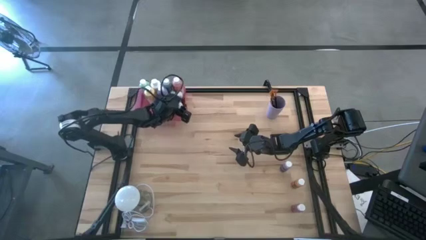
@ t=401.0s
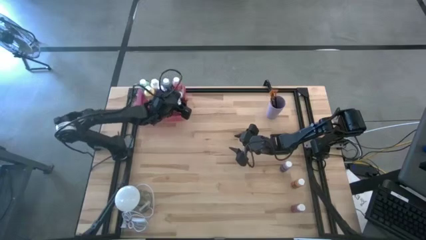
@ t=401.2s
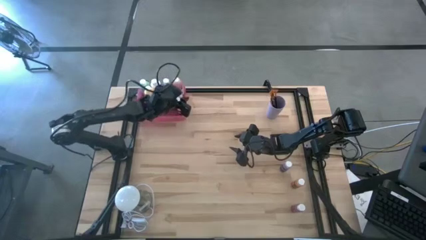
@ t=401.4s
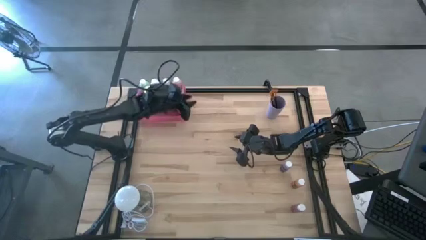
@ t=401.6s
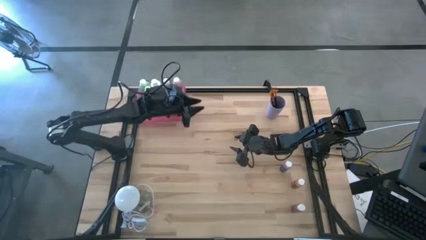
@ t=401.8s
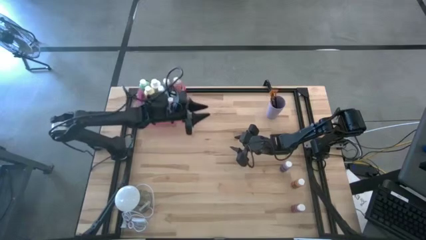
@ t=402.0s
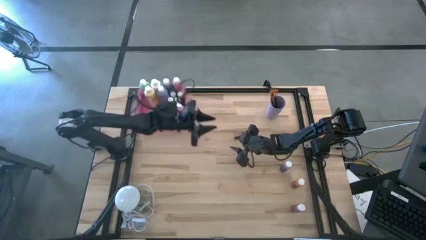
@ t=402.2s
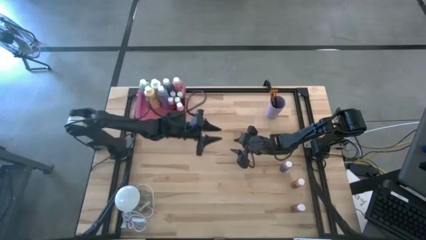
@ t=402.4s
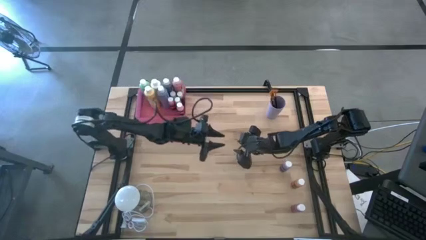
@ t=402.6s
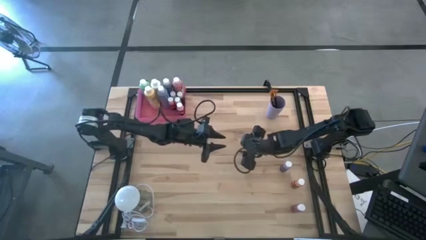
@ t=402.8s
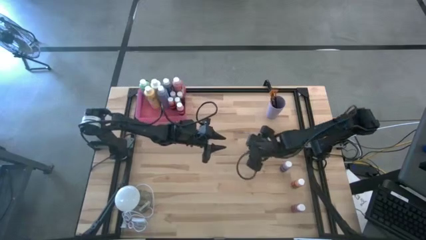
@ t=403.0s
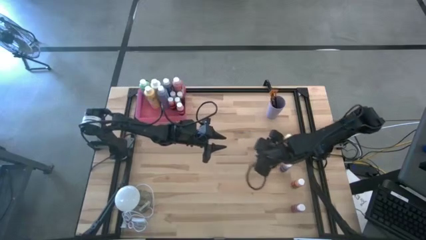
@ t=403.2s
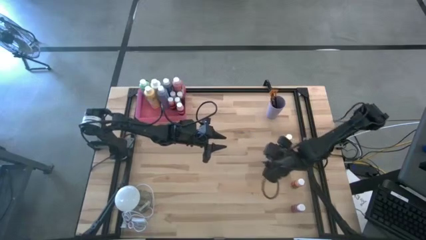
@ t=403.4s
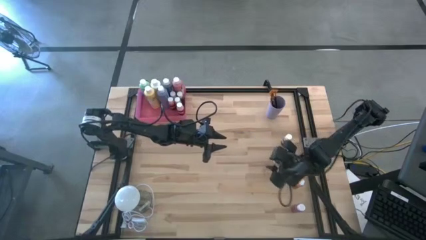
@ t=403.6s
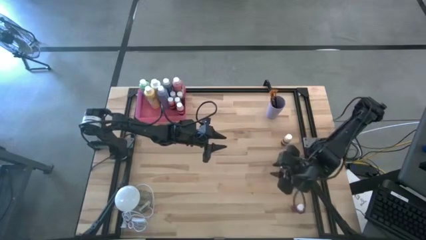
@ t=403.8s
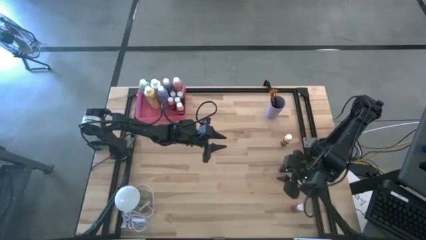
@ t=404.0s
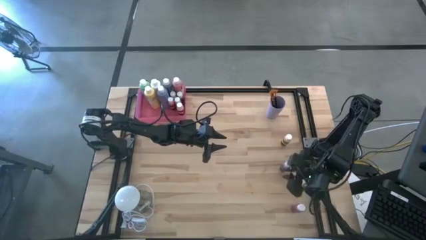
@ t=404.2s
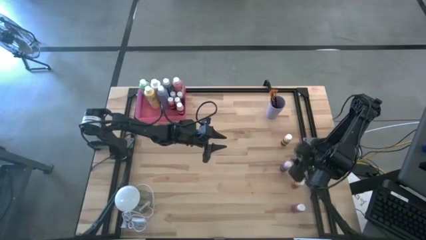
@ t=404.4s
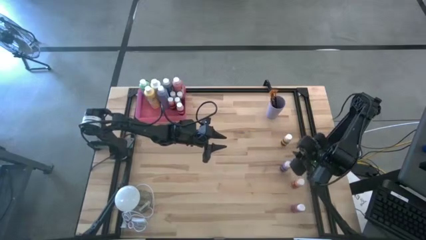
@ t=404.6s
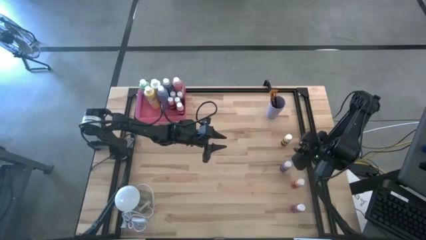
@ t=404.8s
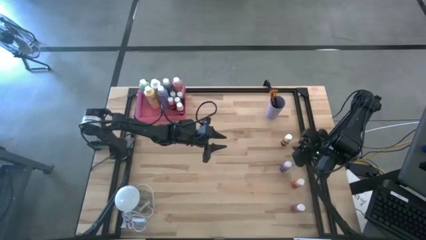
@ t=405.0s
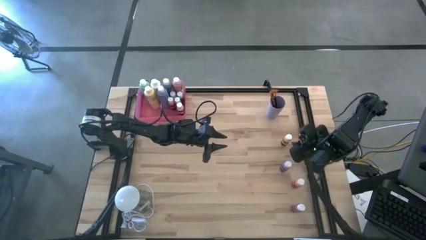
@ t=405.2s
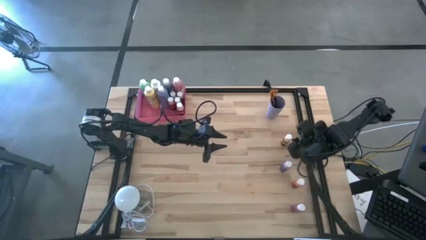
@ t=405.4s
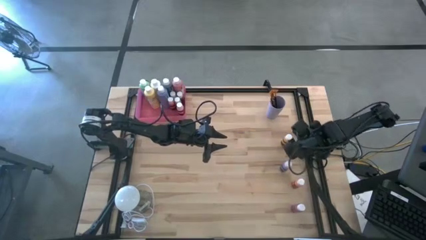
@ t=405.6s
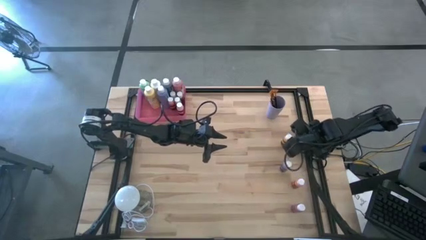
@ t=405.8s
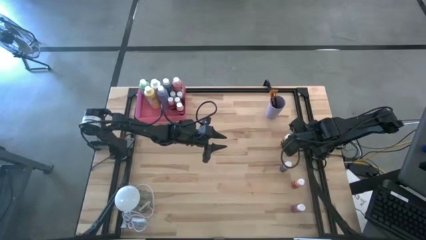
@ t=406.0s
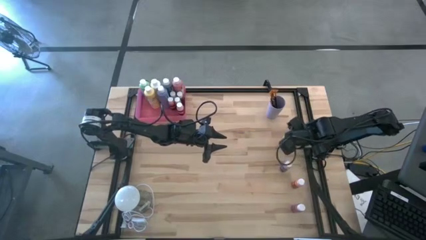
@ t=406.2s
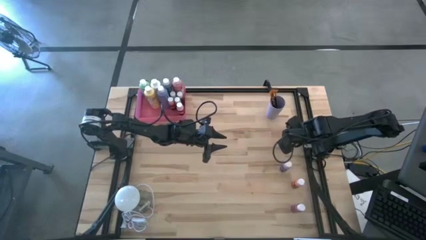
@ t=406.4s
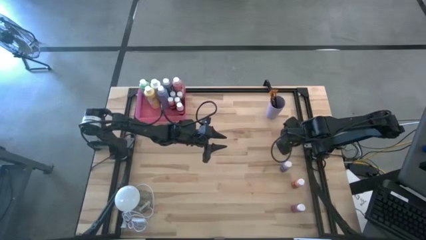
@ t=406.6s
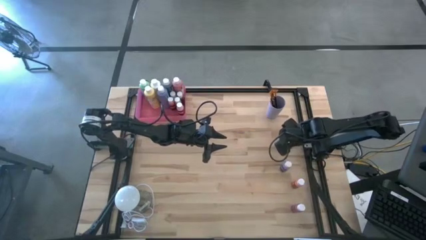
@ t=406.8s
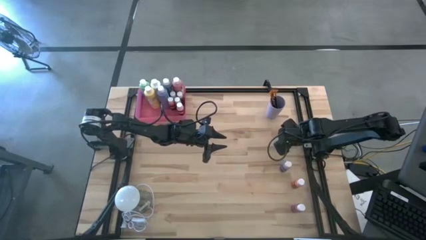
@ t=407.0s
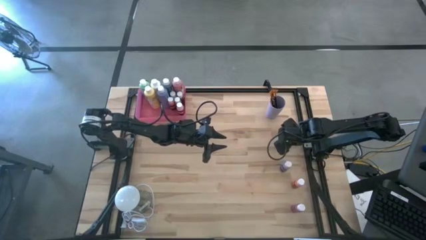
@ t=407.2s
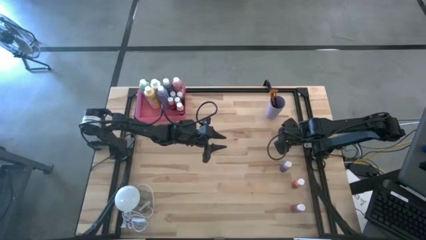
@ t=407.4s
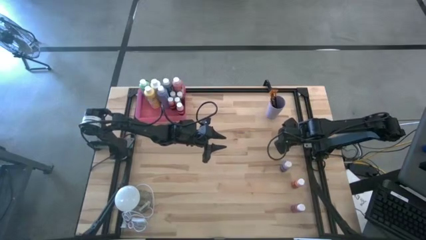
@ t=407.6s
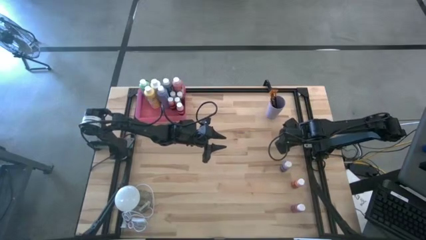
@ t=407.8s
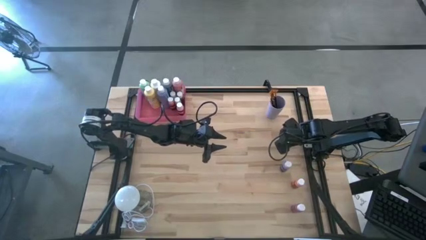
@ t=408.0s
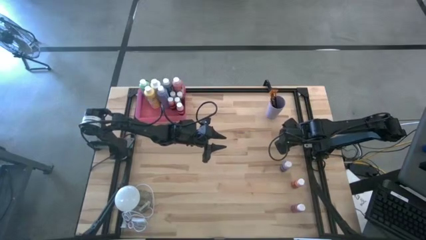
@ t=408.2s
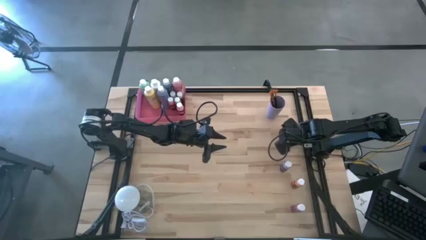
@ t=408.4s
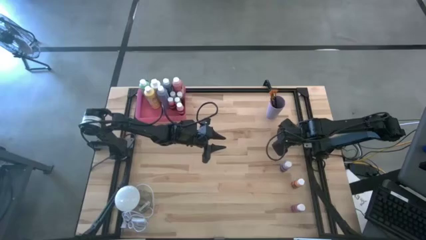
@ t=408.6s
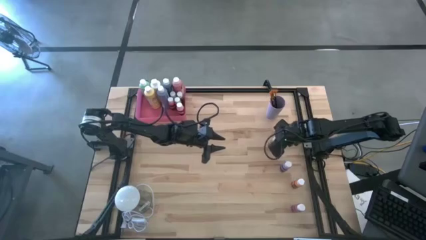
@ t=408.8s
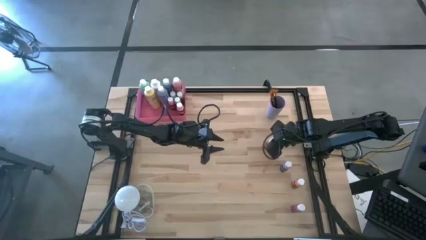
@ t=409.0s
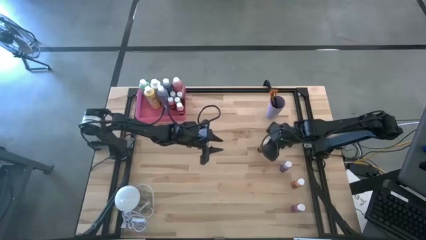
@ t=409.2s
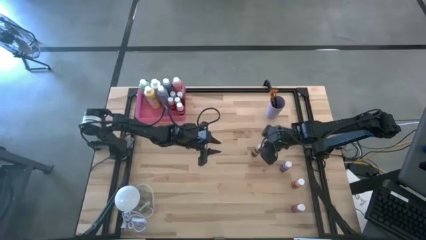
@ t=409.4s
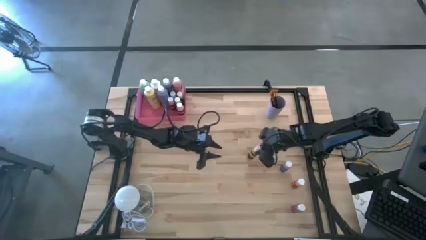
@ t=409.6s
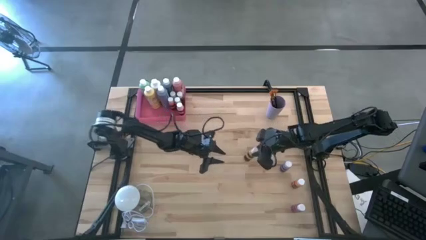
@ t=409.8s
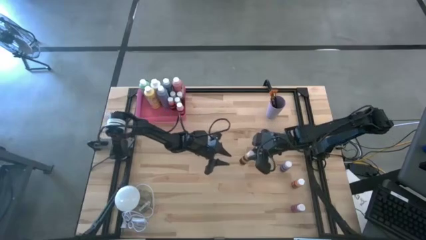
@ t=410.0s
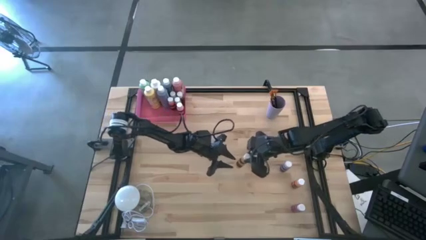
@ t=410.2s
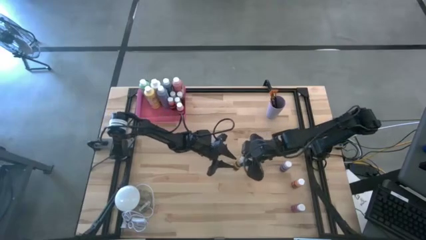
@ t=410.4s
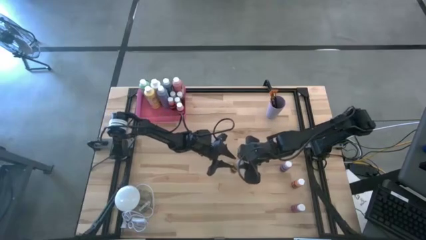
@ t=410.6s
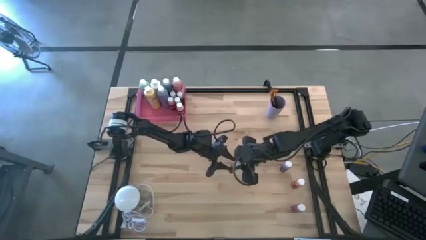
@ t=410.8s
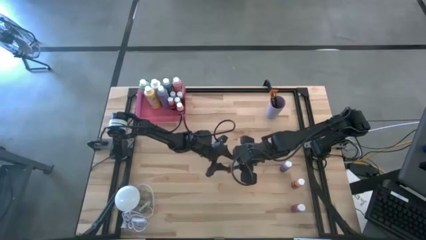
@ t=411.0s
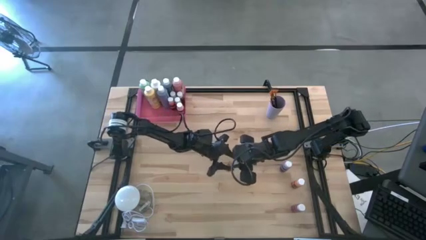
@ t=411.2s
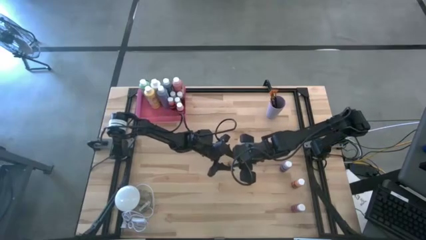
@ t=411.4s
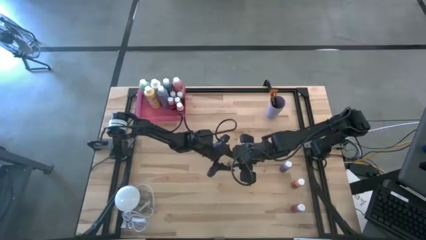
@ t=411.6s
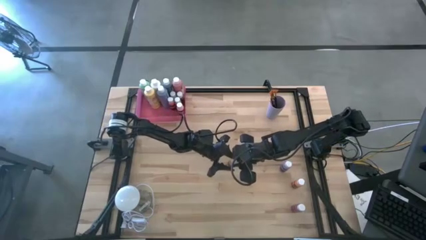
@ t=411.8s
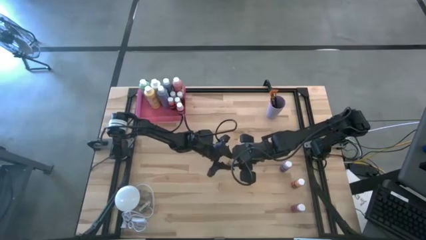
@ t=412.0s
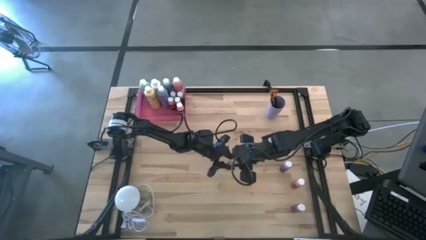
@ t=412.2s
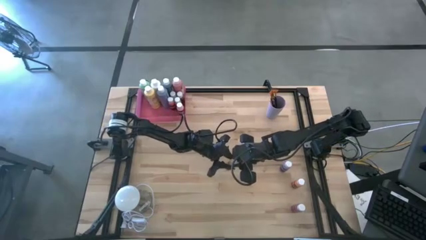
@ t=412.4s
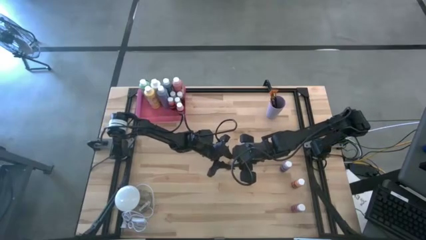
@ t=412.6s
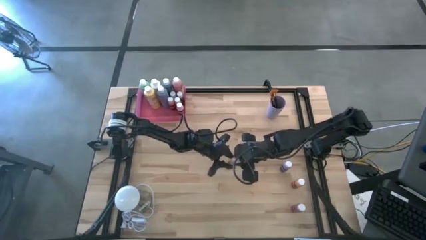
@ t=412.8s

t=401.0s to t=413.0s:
Task: Pick & Place Paint Supplies
Put the small yellow paint bottle into the pink bin
